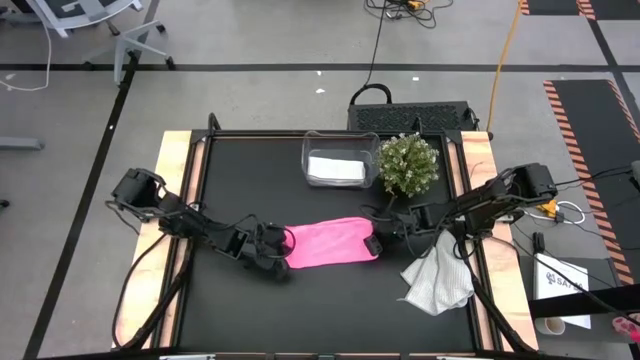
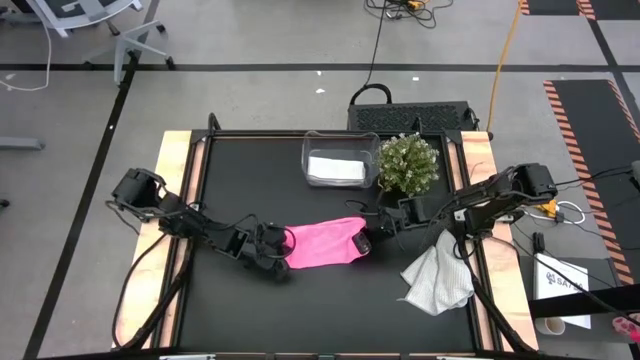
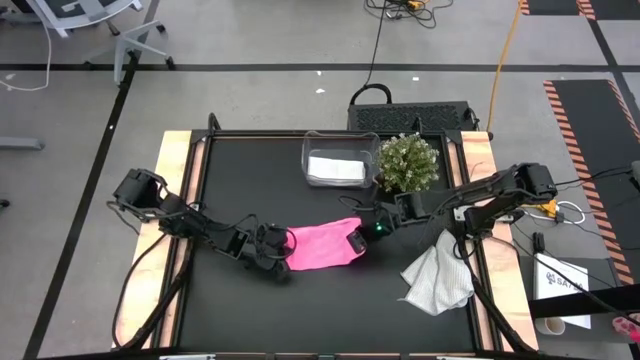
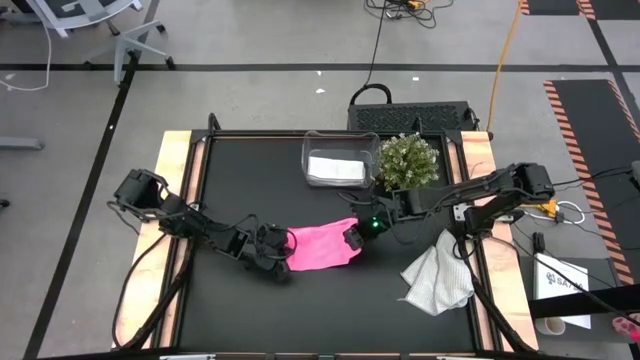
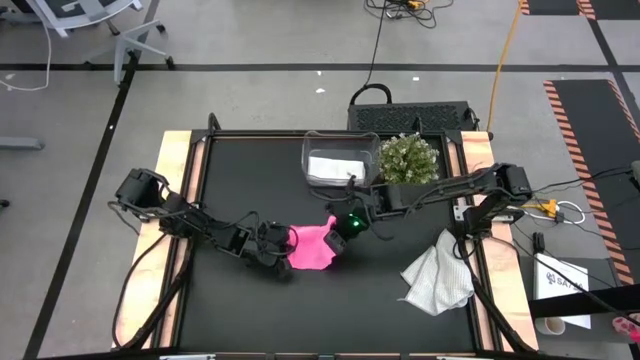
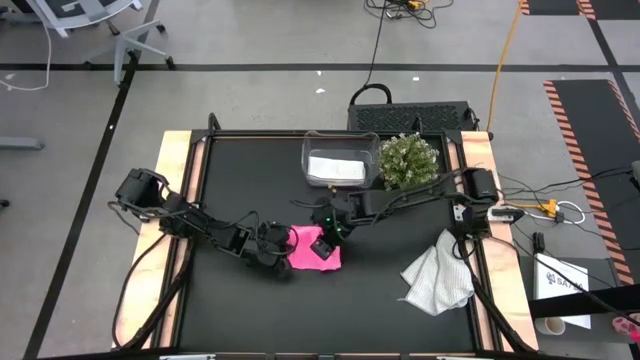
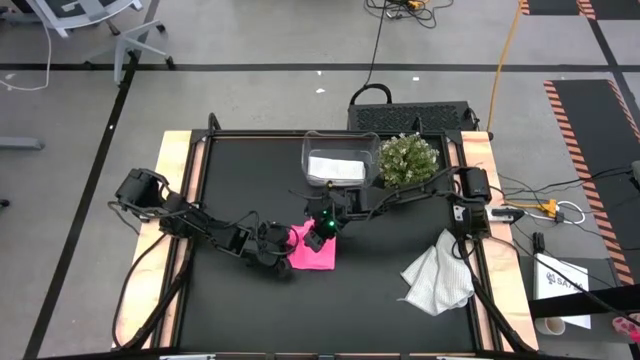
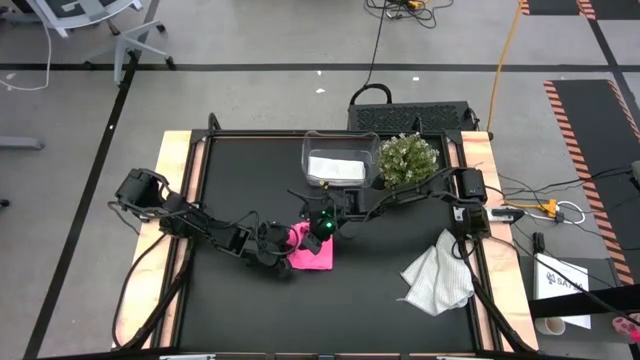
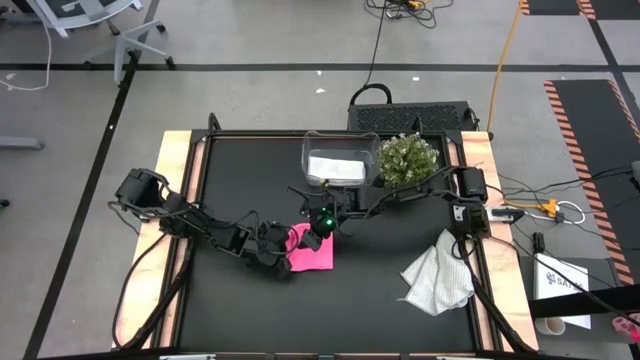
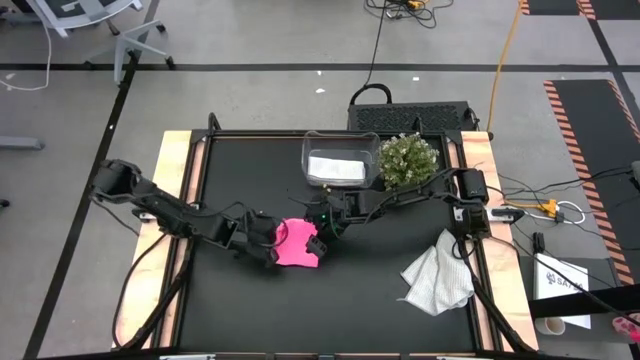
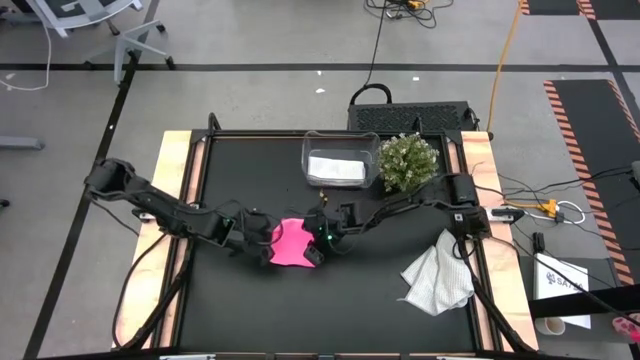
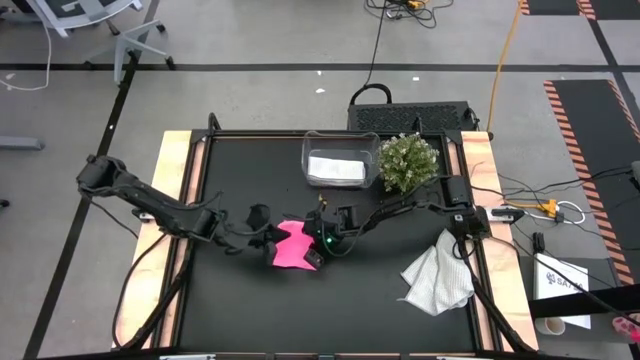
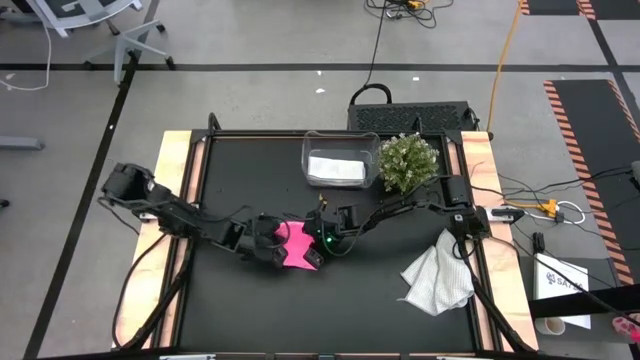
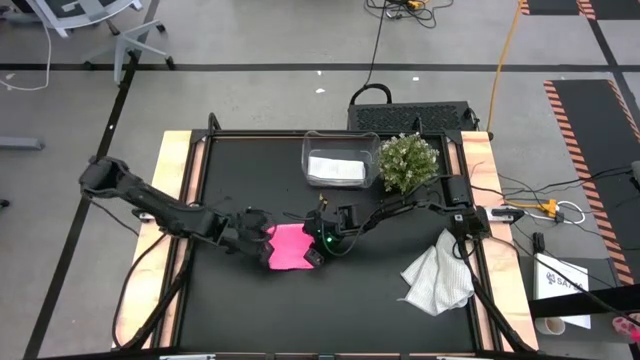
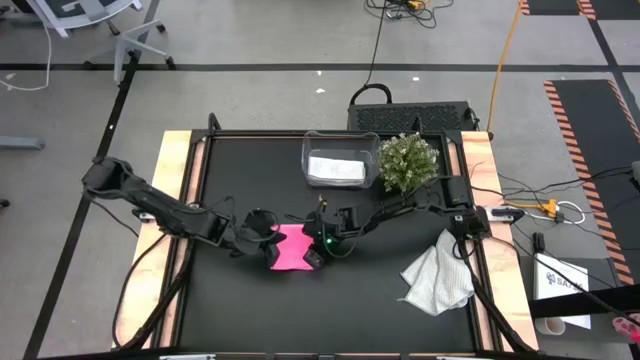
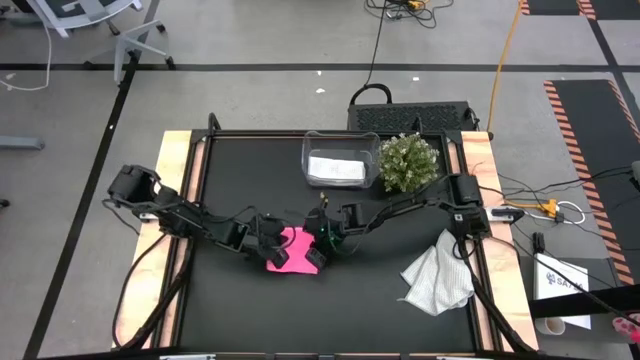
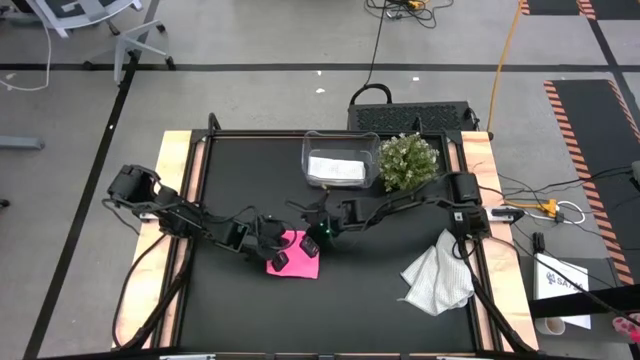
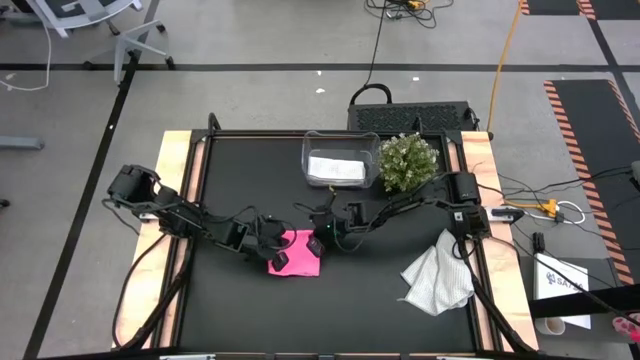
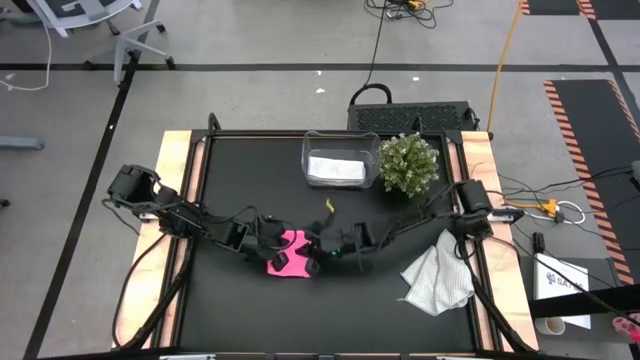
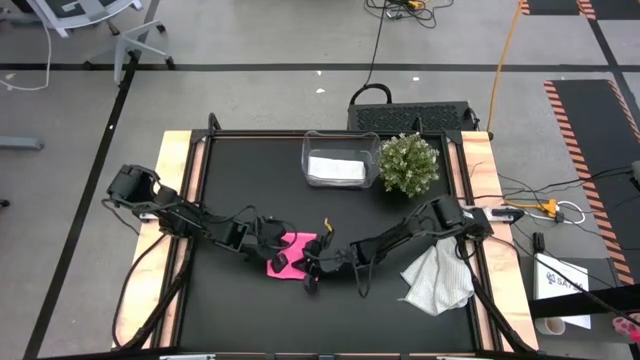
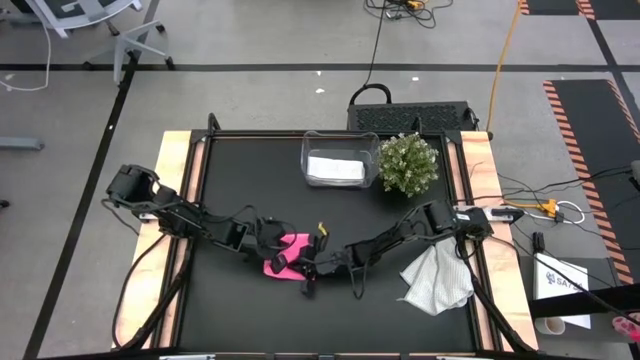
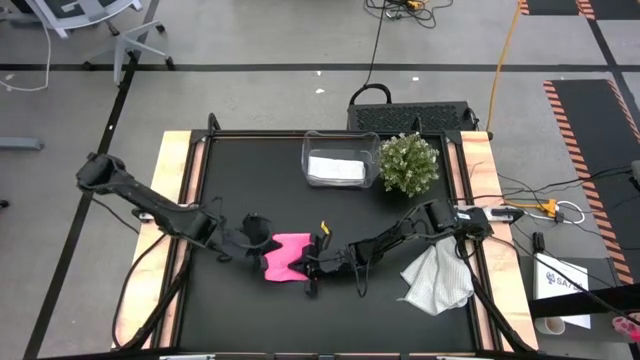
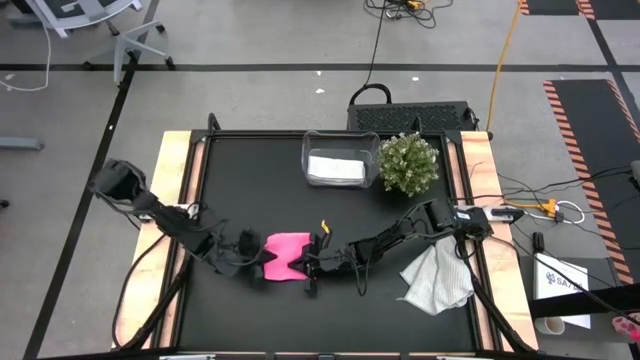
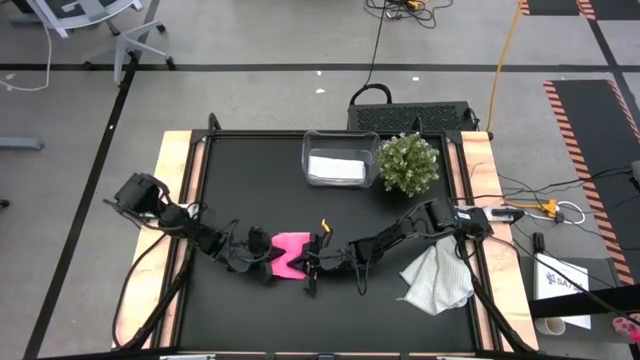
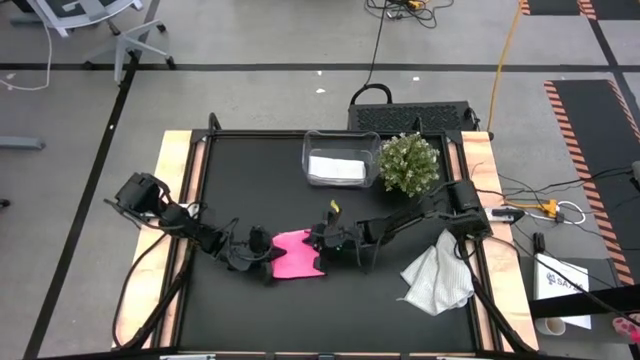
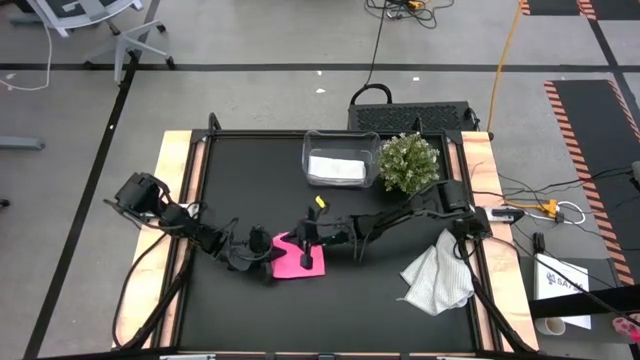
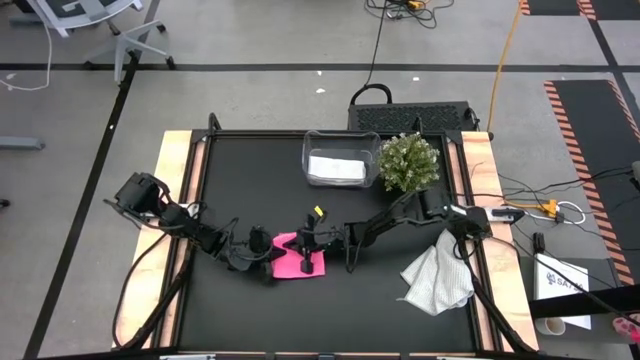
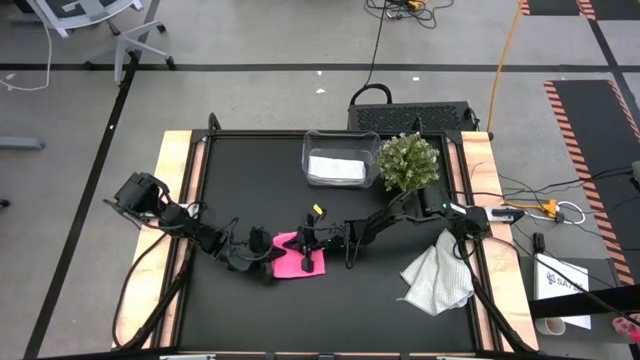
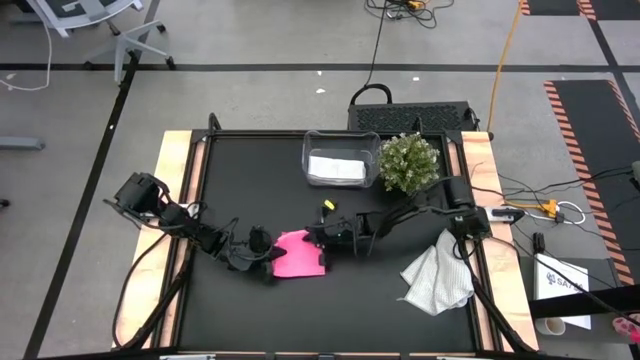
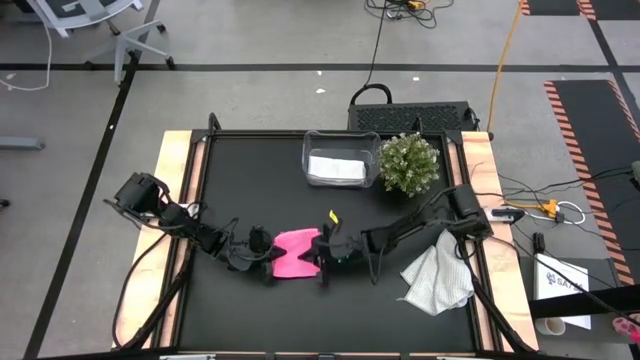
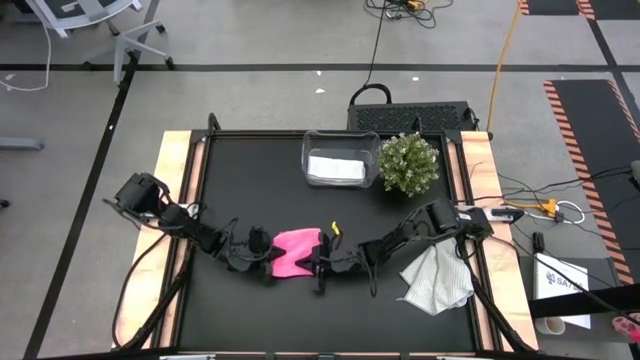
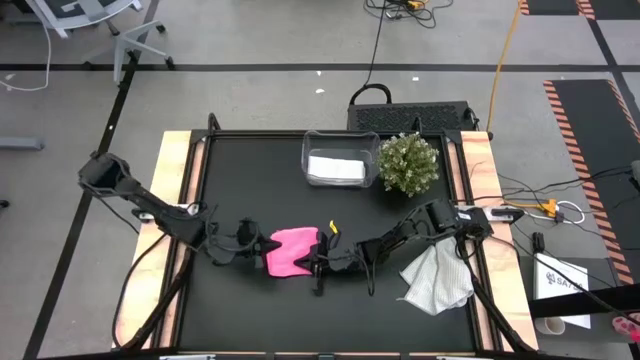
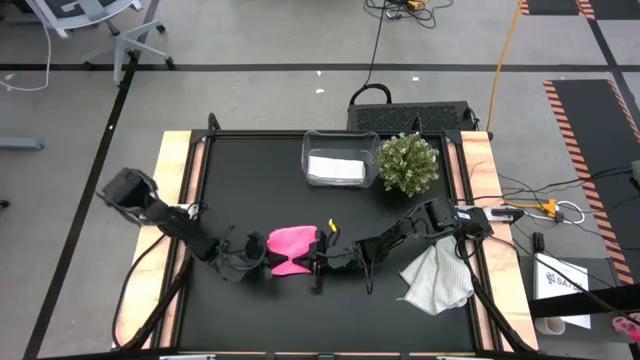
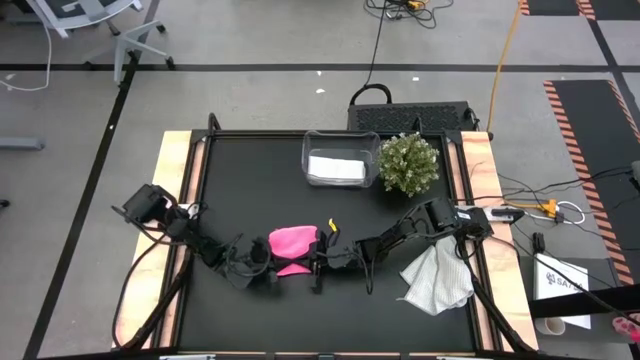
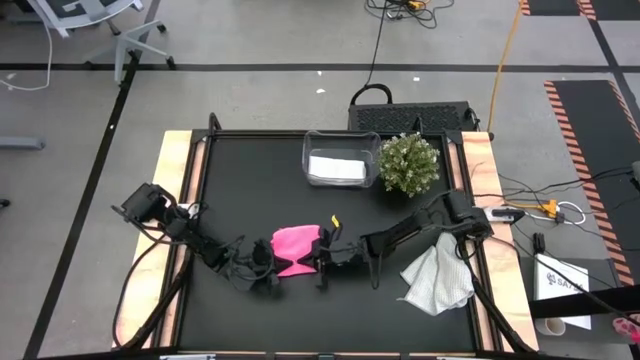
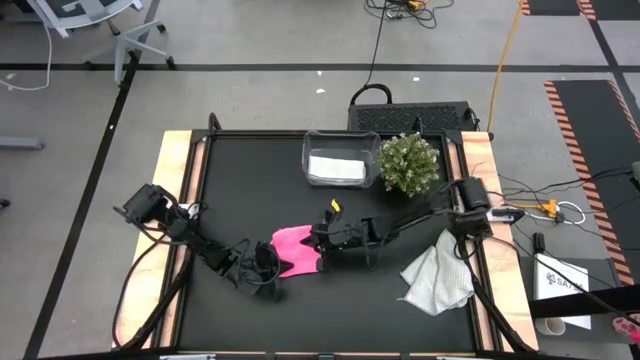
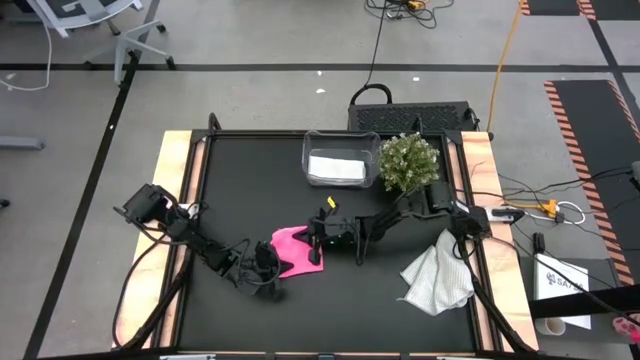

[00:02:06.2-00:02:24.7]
Task: Fold microfiber towels
Fold the pink towel

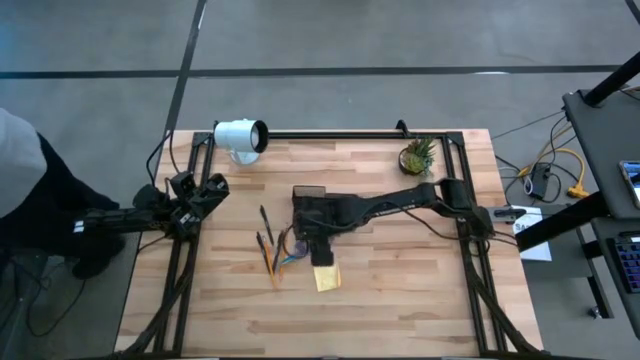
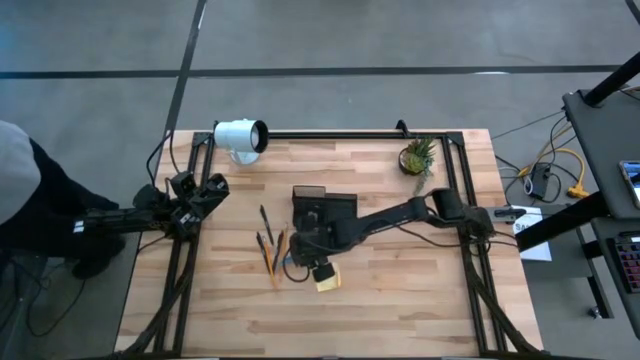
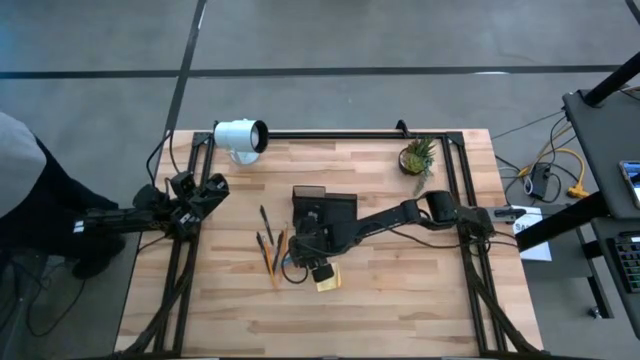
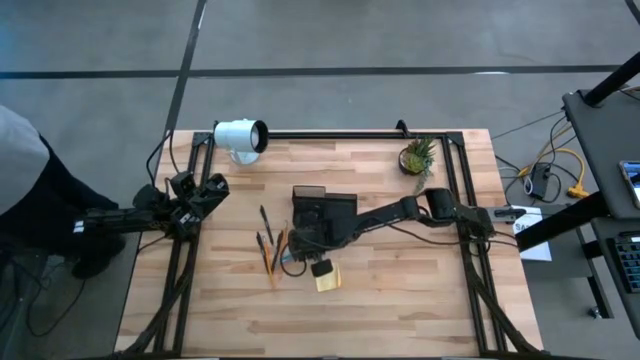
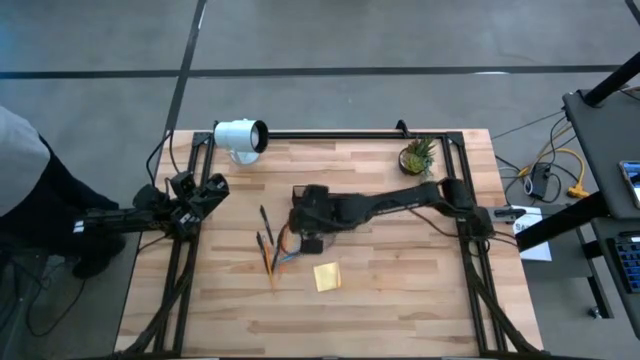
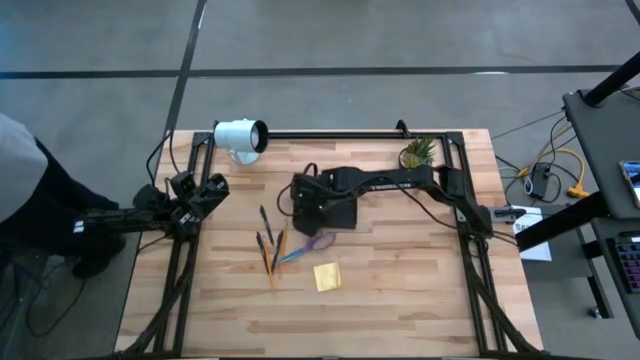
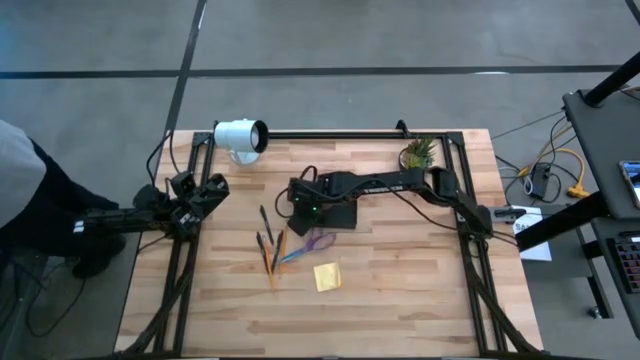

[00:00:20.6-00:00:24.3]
Task: Pick and place office supplies into organizer
Put the blue eraser into the black desk organizer
